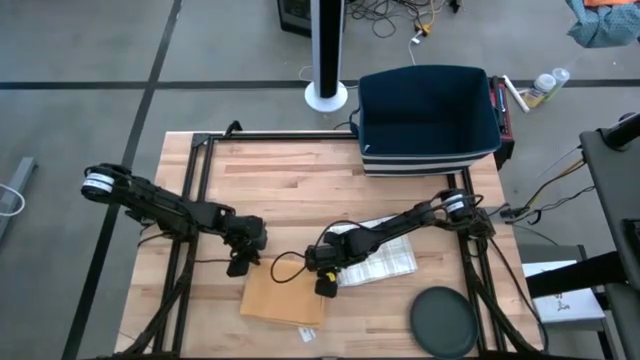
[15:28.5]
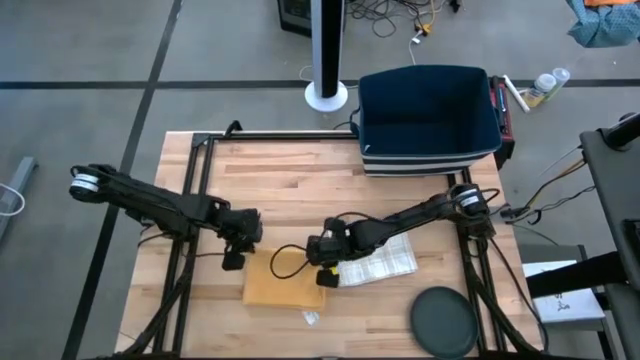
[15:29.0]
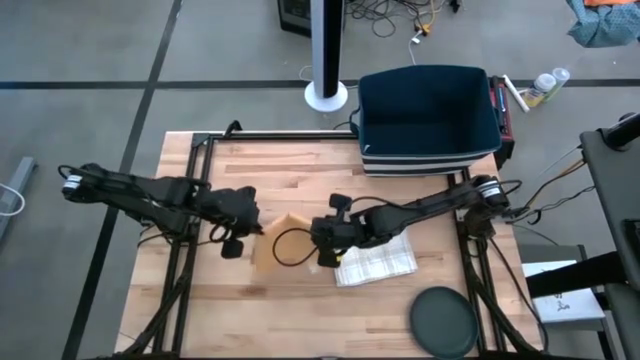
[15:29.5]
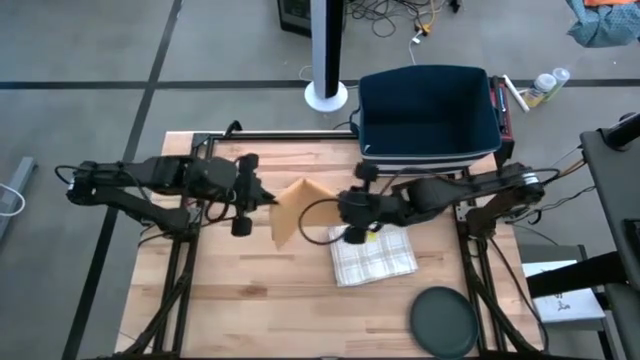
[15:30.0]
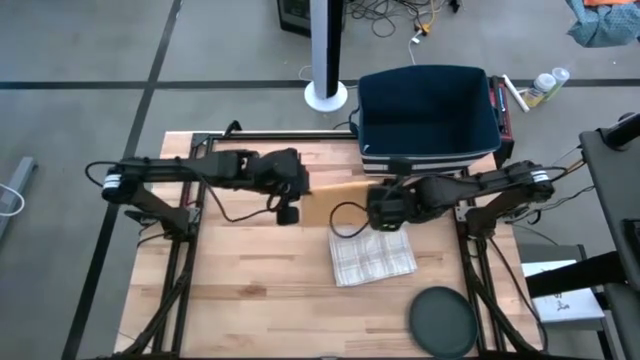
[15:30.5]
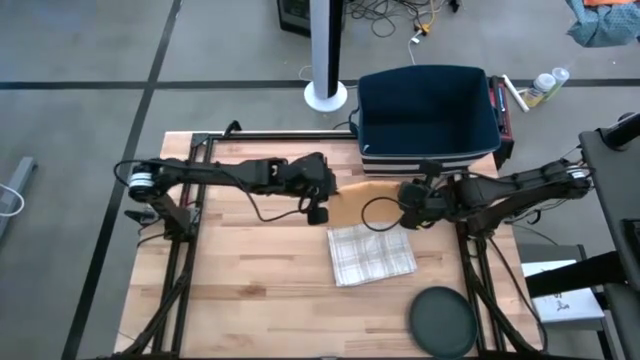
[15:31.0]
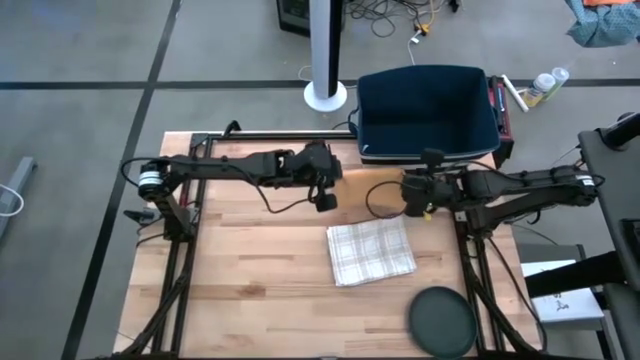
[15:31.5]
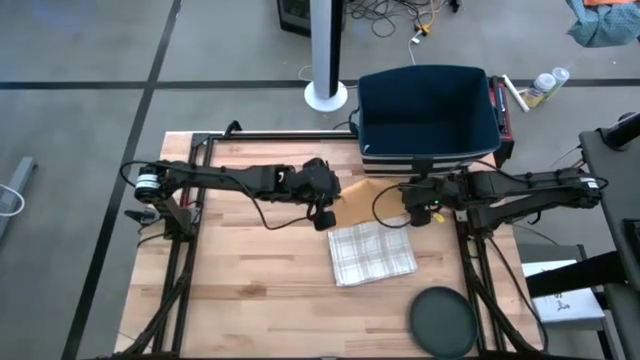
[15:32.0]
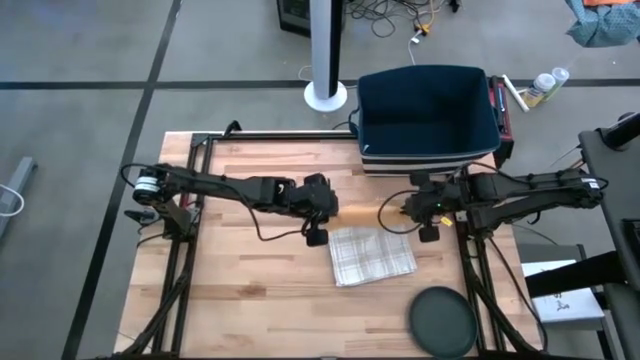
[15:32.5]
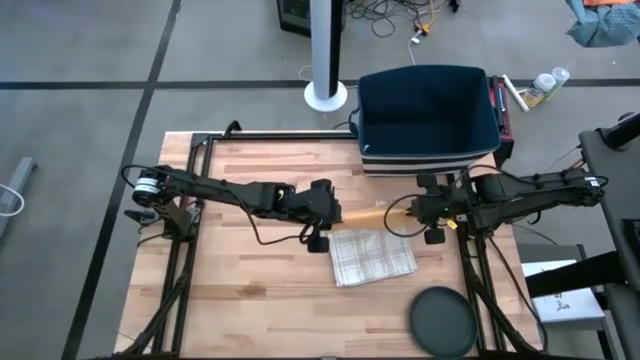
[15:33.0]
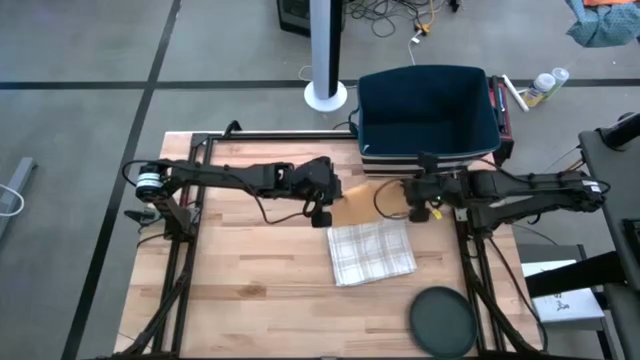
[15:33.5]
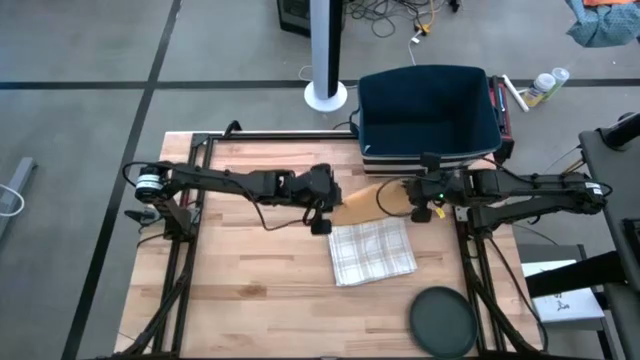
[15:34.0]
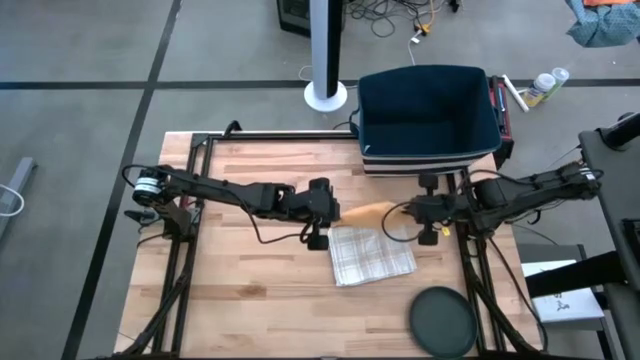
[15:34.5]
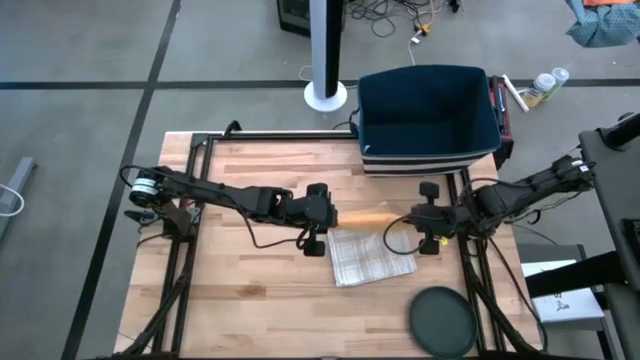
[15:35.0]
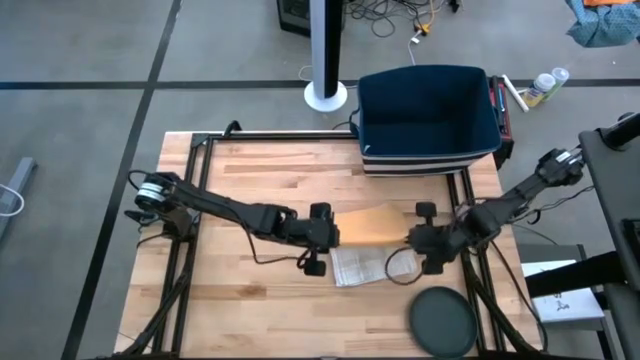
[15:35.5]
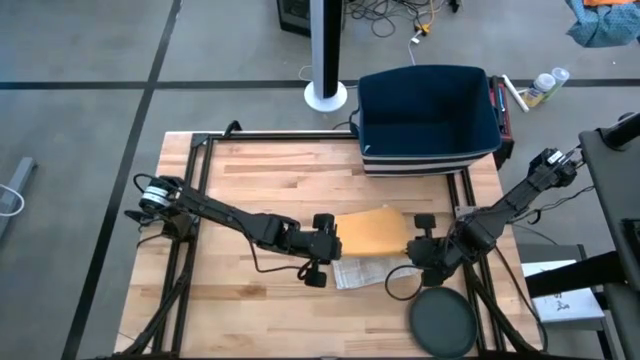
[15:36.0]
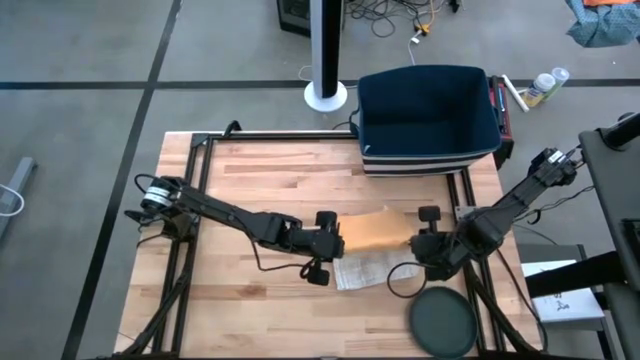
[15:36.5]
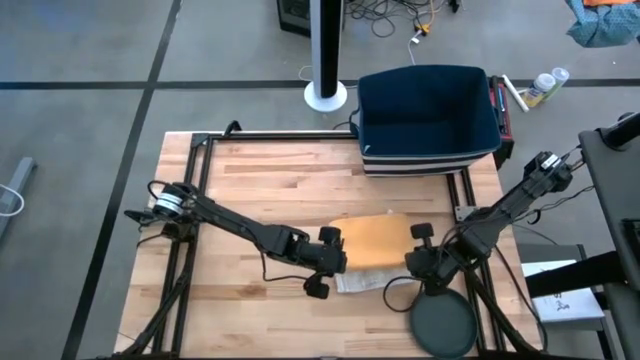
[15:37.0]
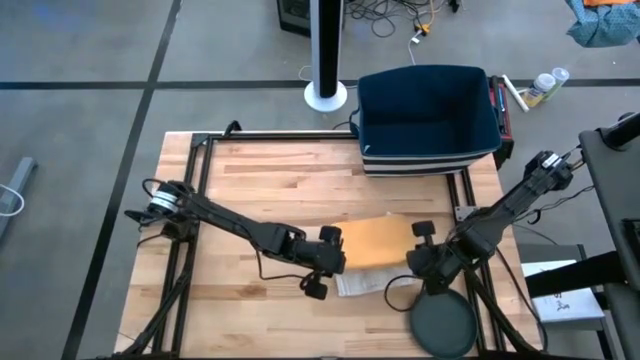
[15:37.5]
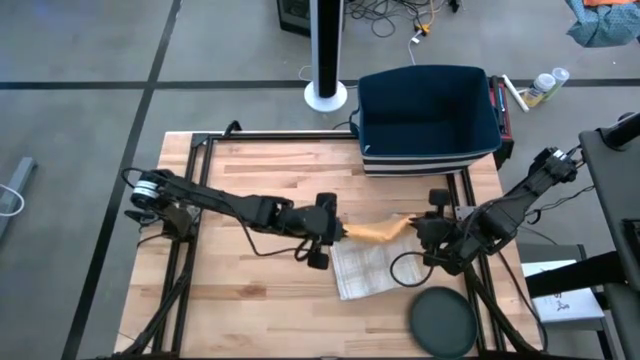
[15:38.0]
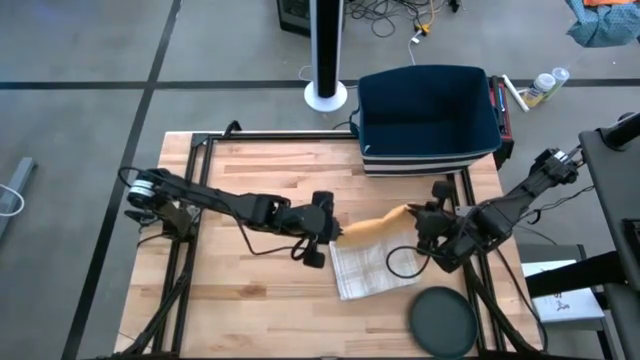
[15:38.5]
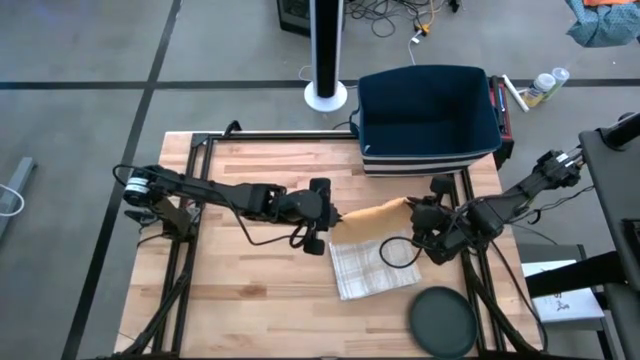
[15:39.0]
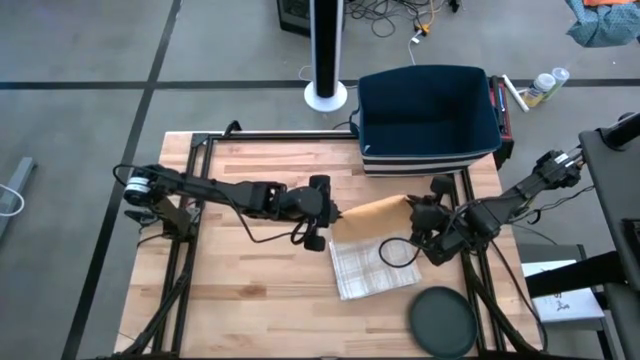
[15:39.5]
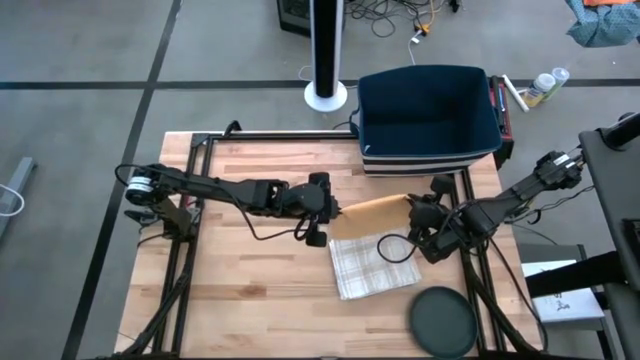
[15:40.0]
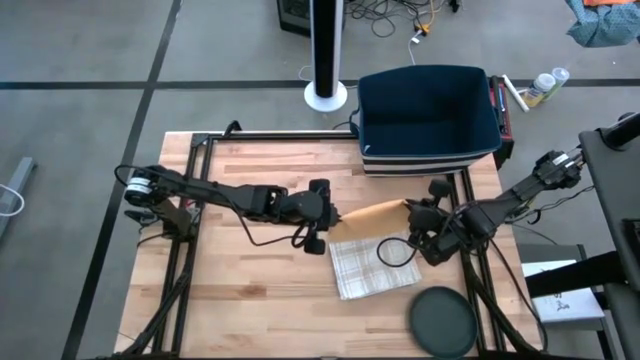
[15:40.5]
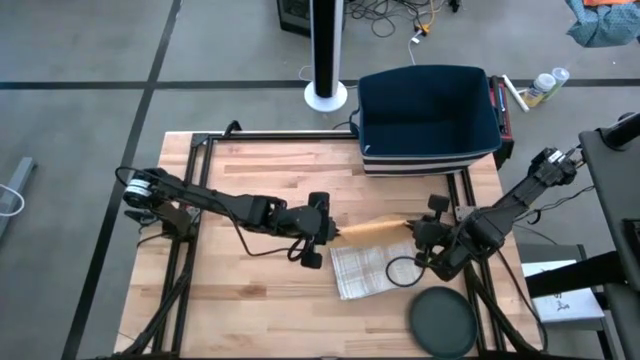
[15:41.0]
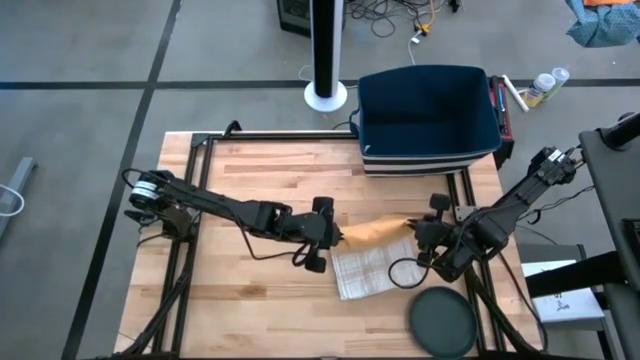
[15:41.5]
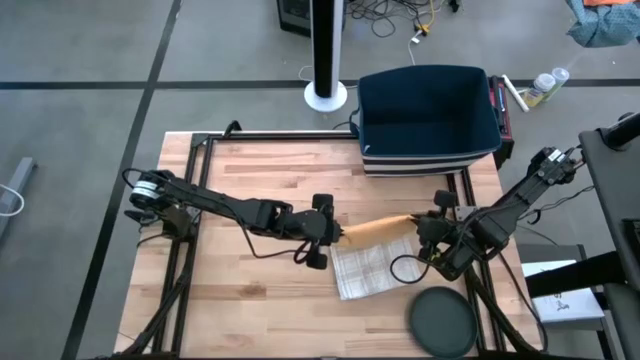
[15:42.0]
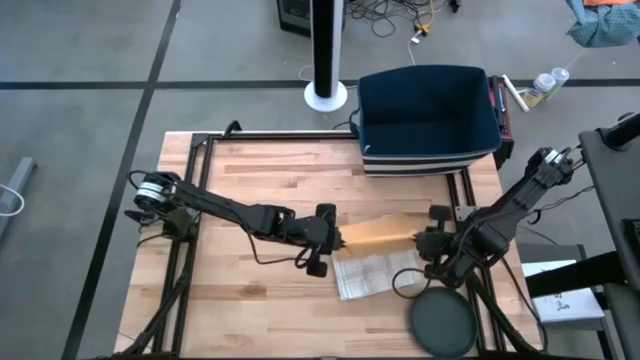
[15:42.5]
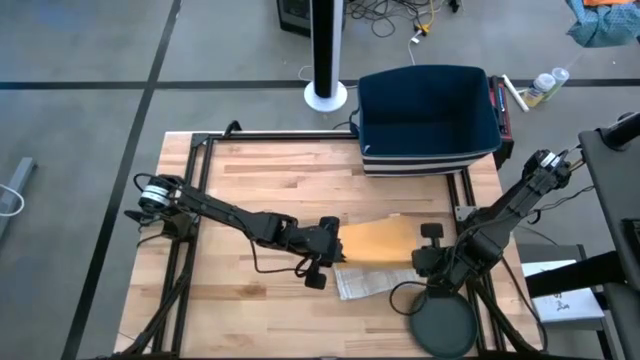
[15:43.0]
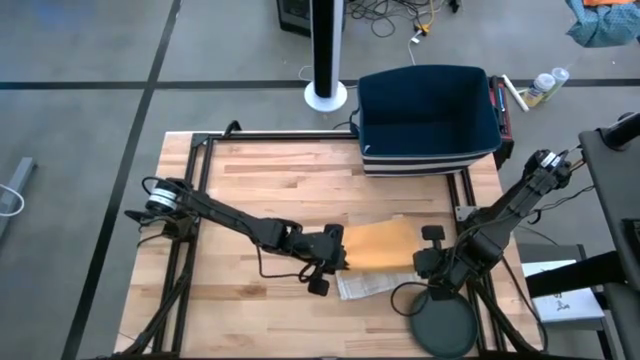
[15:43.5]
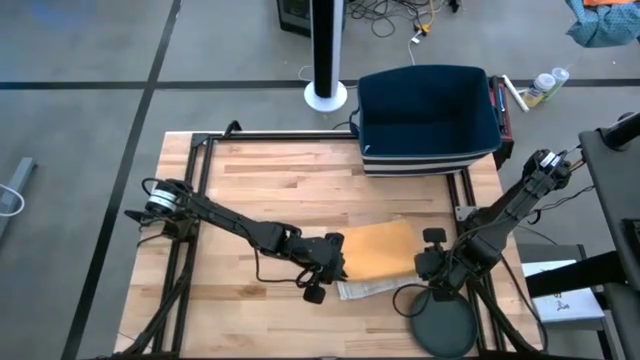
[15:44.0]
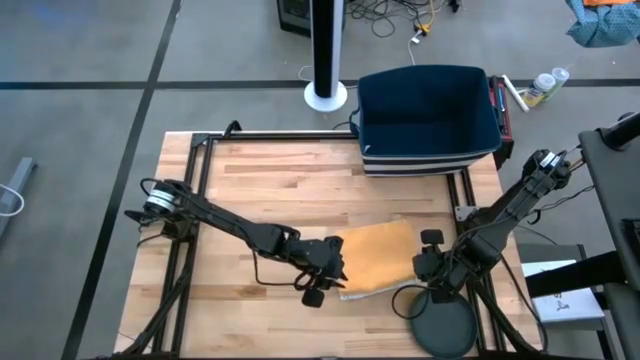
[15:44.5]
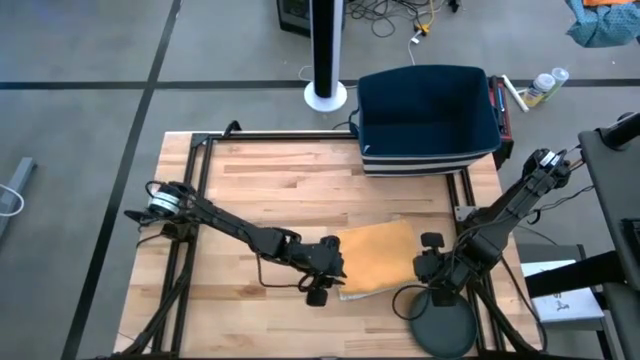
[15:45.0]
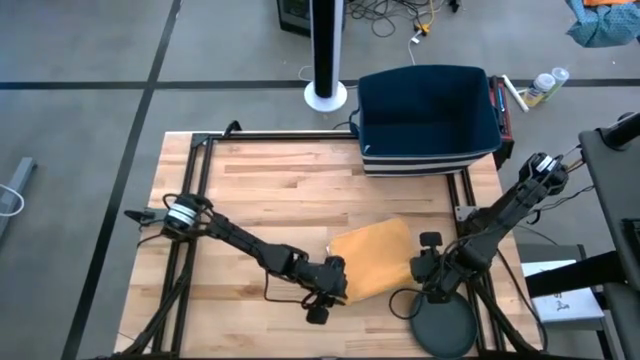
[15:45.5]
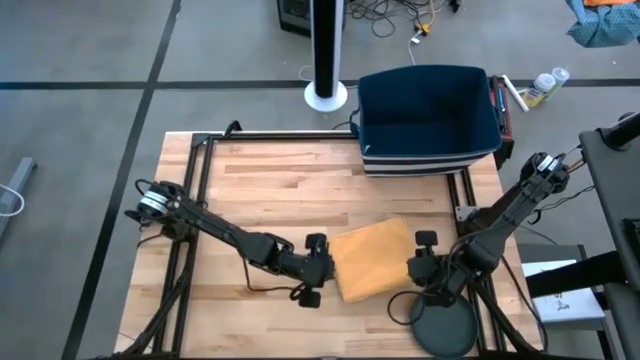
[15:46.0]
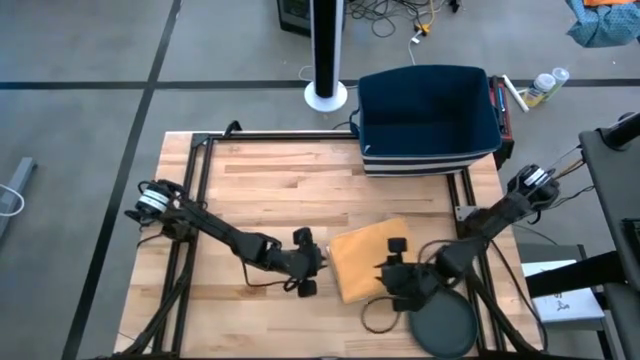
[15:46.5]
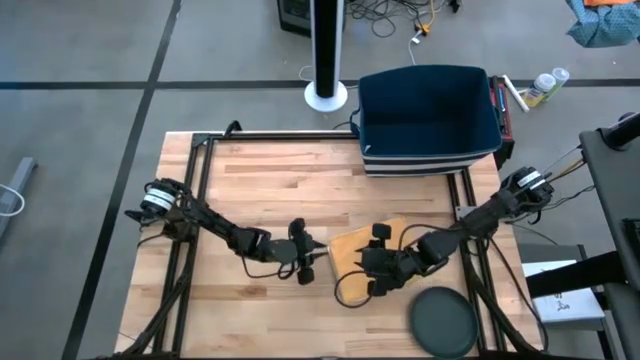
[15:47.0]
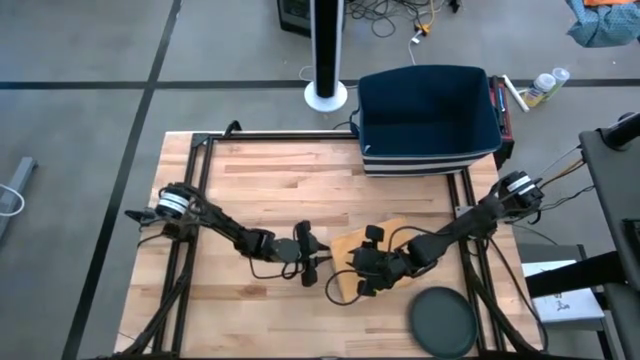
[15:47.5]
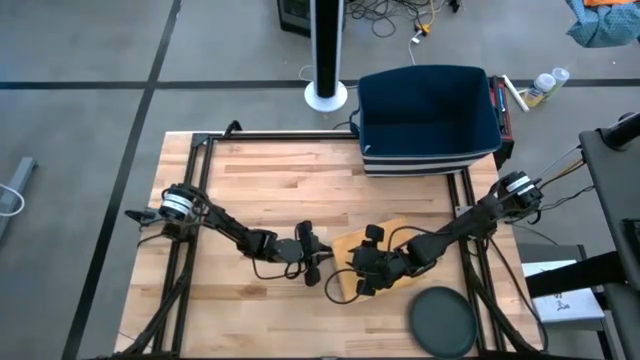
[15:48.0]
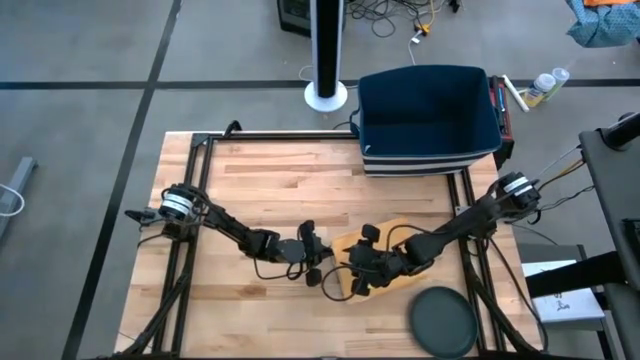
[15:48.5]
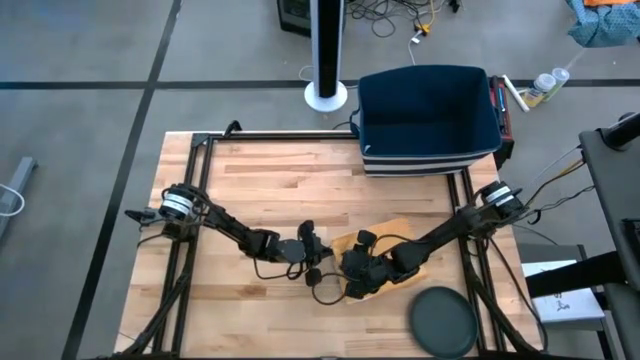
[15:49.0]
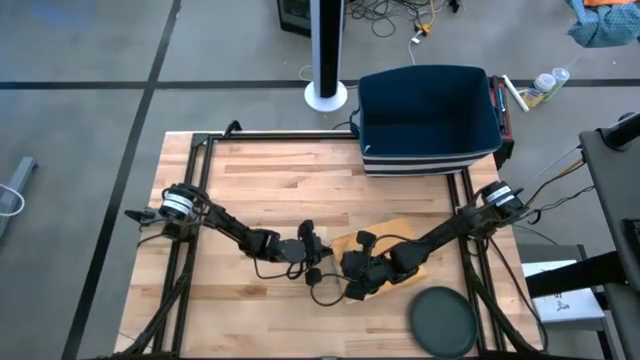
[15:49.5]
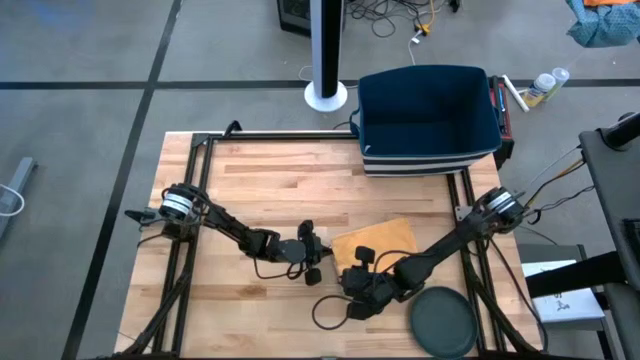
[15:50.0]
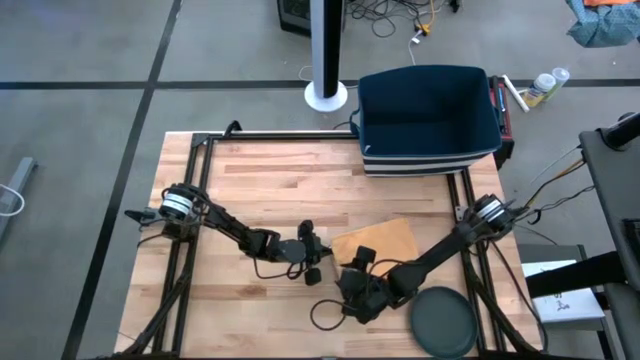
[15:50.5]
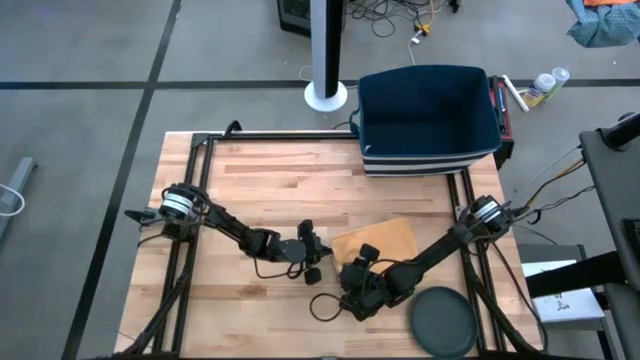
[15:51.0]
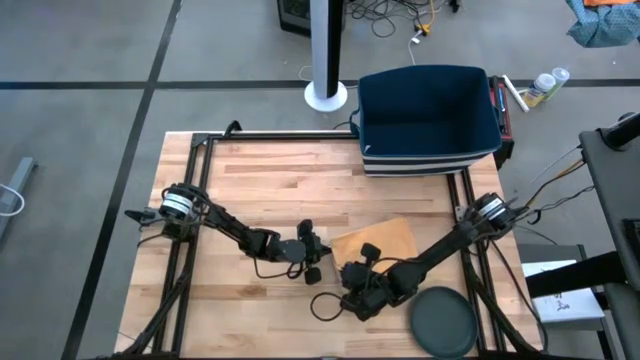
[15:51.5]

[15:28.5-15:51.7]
Task: Fold kitchen towel into neat rectangle
Stack the orange towel on top of the white patterned towel
